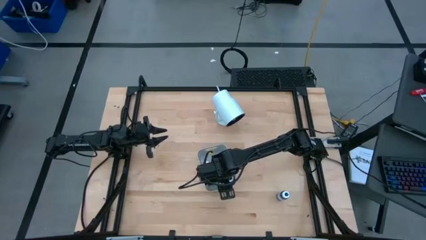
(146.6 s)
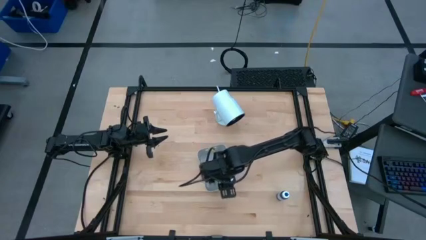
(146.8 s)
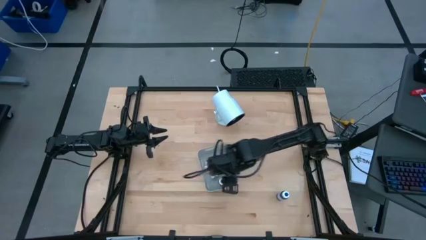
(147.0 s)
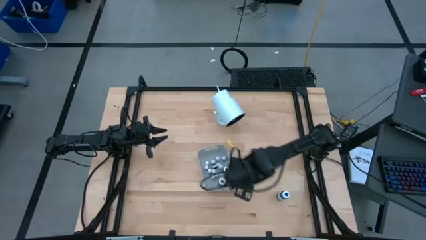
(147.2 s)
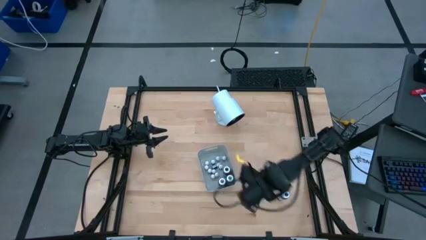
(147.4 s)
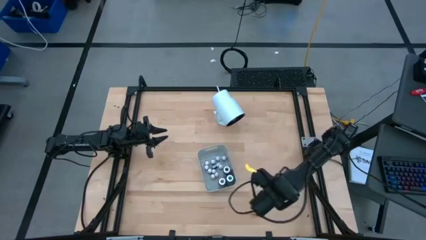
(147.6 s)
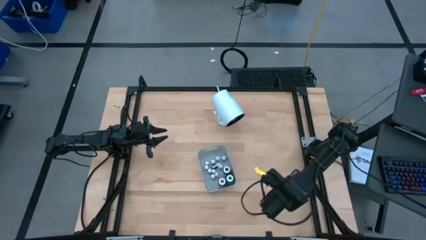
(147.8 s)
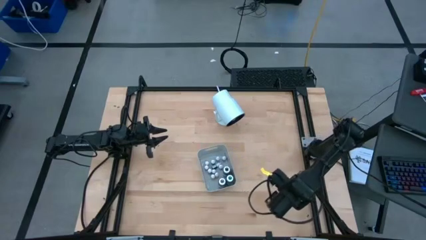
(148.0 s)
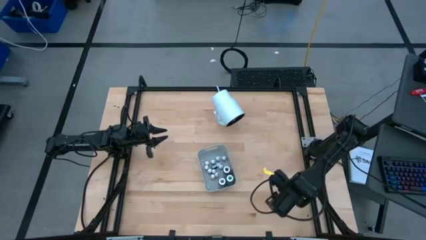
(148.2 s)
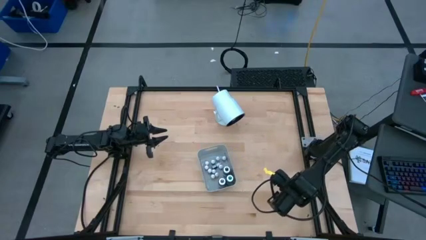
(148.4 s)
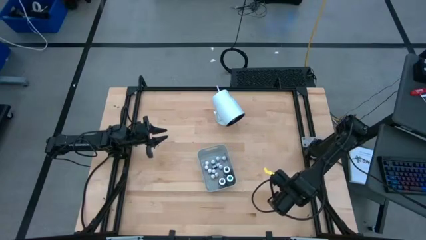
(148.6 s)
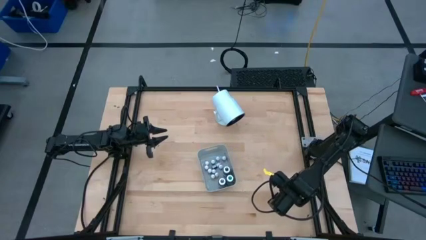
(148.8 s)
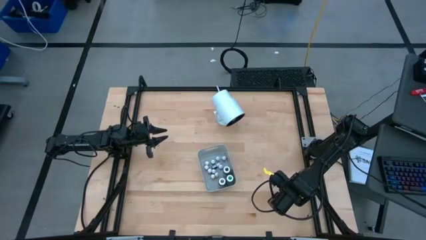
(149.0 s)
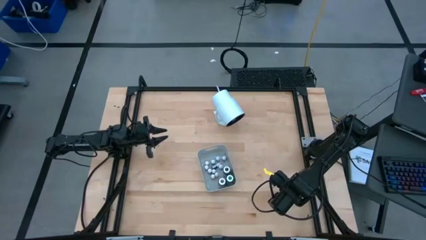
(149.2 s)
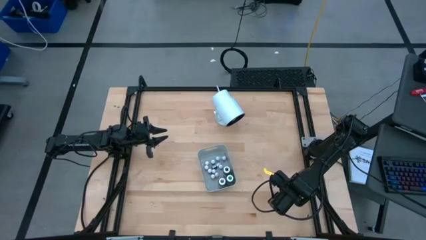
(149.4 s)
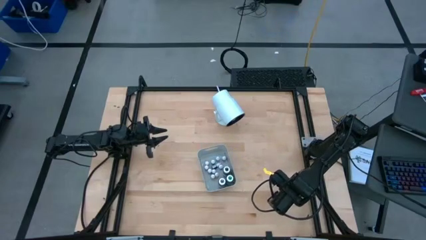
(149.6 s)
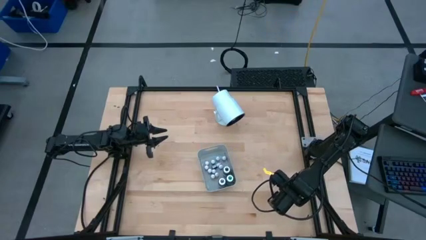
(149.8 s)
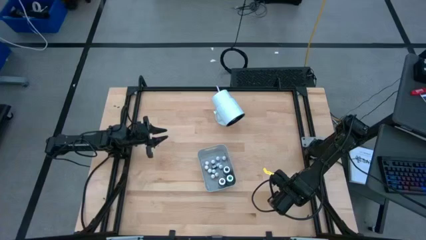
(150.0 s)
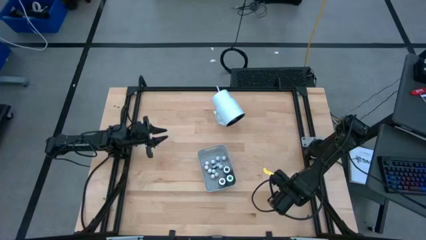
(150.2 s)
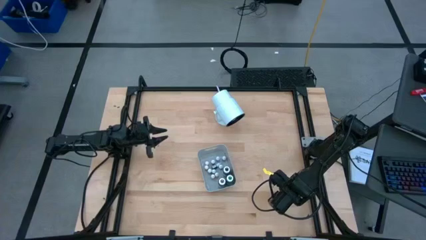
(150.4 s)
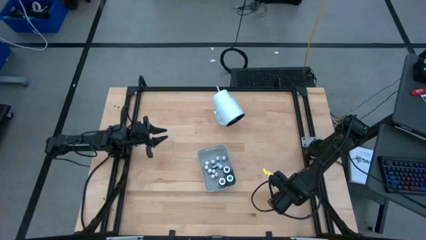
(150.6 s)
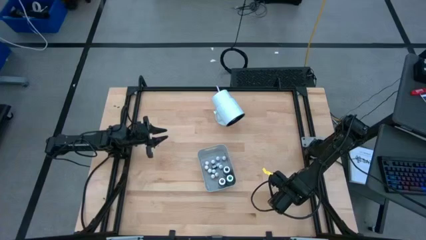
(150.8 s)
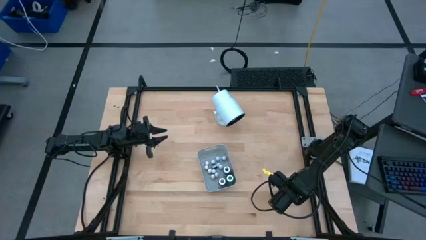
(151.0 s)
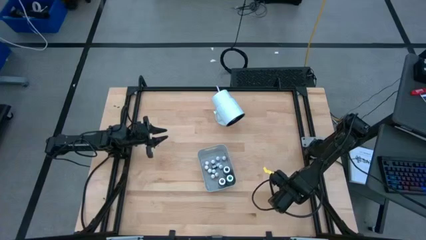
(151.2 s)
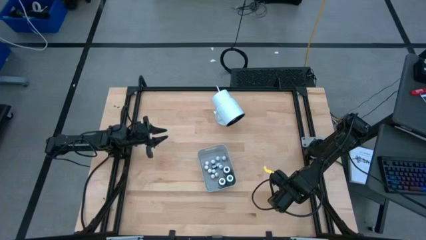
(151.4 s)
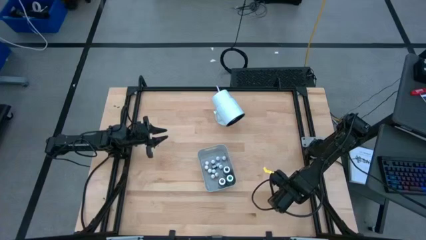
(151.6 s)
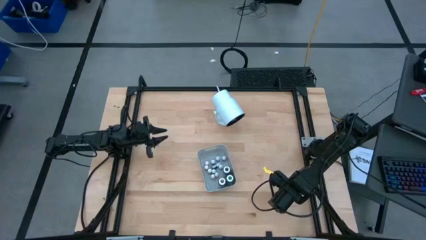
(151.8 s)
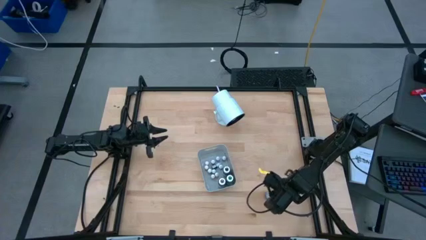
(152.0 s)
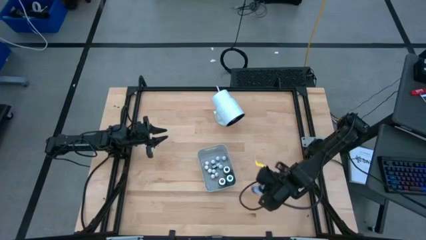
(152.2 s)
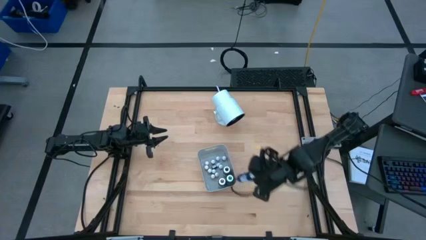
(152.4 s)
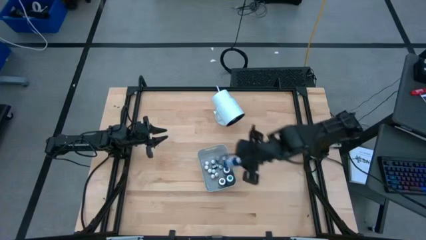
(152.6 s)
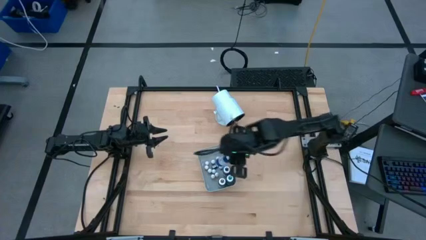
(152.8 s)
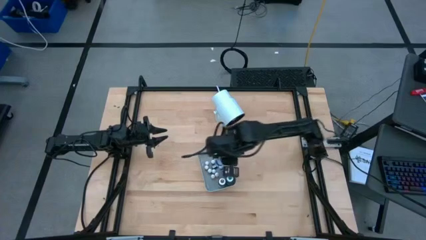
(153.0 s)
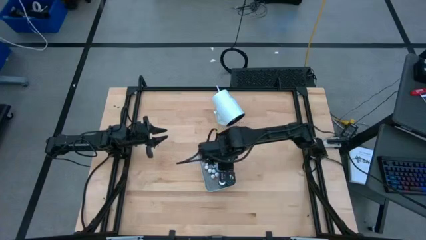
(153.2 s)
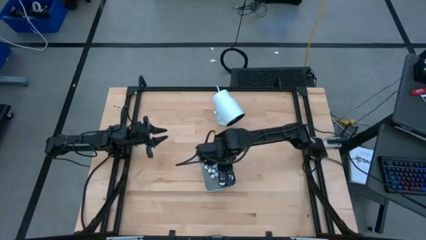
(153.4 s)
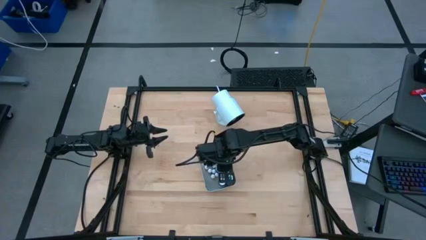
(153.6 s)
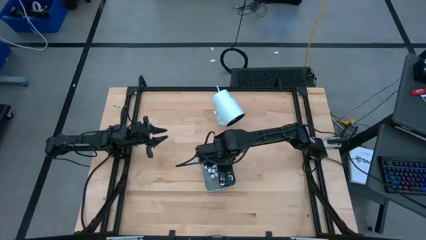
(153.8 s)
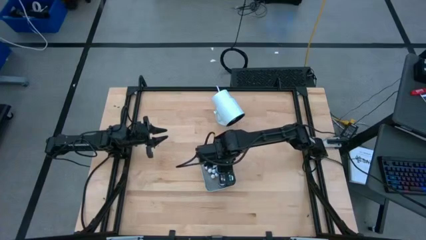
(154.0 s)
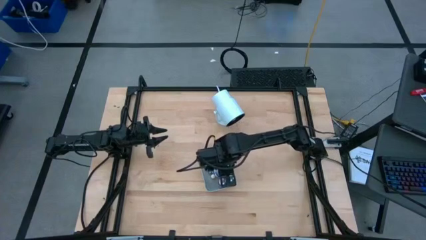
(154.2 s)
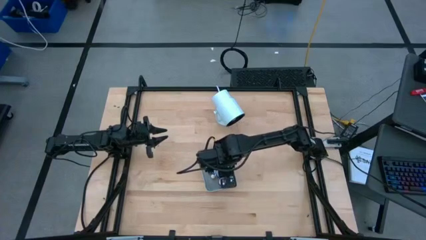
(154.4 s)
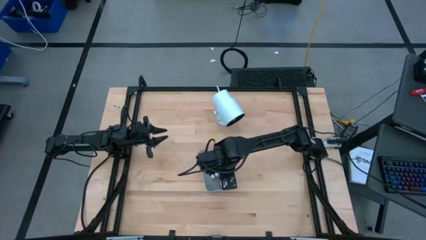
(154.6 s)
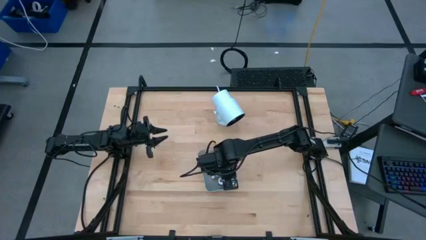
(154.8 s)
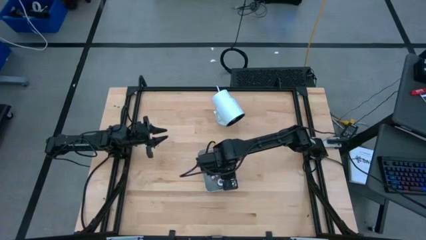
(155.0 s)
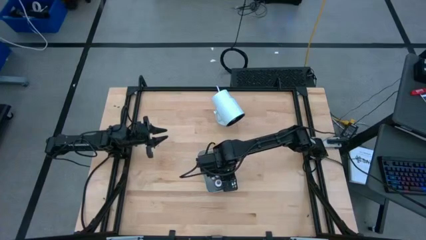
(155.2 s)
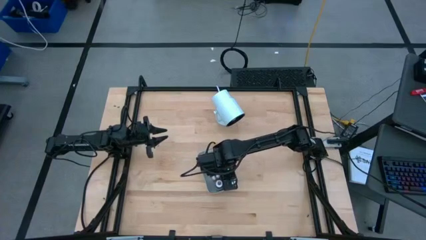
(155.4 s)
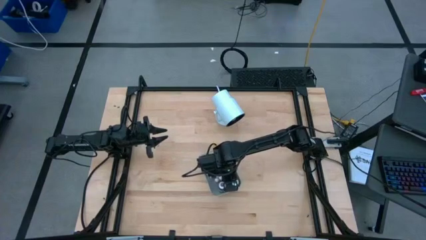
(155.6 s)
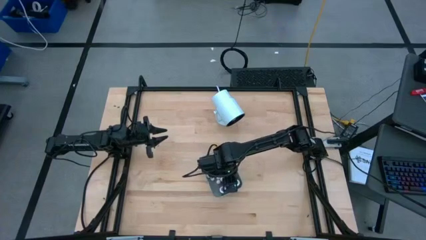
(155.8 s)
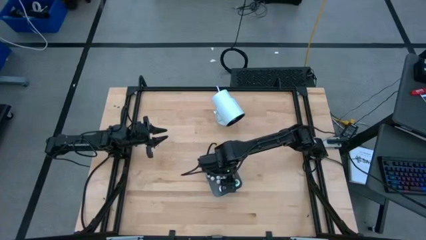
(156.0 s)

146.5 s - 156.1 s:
Task: Pick & Place food coloring
Put the big blue food coloring bottle into the gray bin

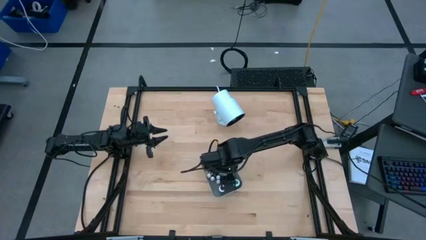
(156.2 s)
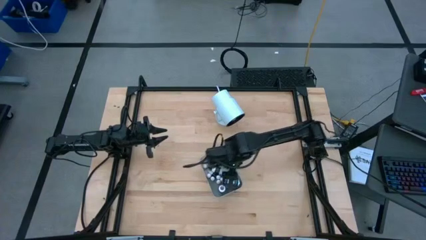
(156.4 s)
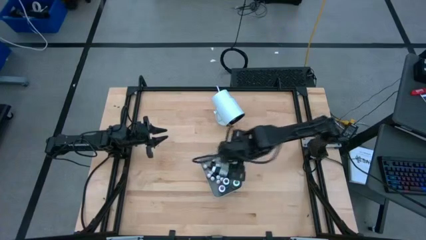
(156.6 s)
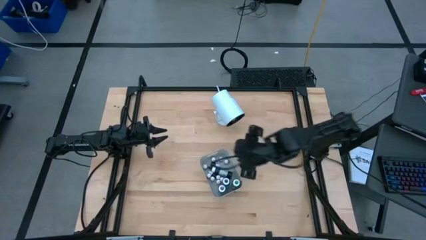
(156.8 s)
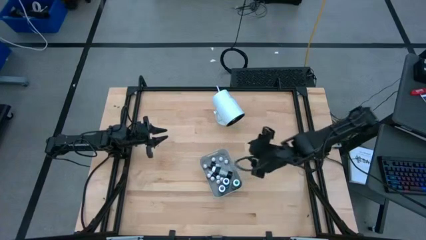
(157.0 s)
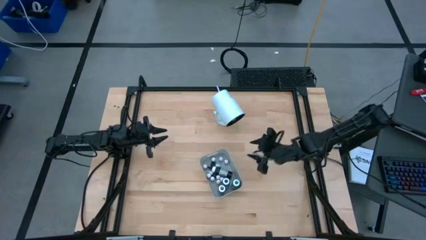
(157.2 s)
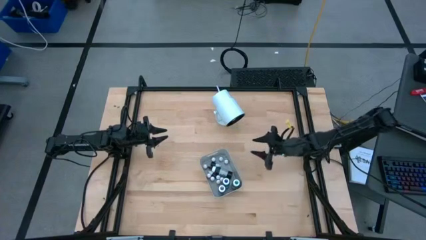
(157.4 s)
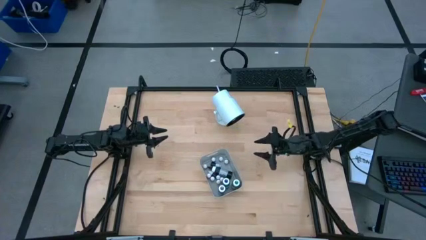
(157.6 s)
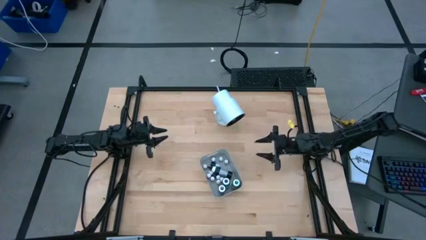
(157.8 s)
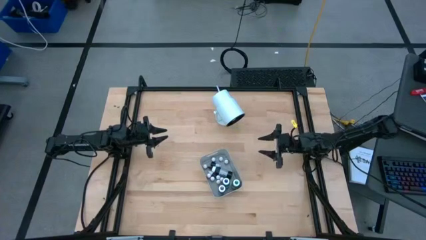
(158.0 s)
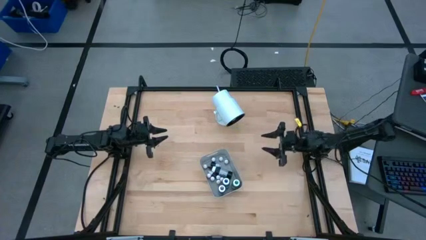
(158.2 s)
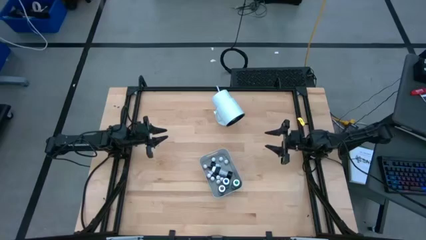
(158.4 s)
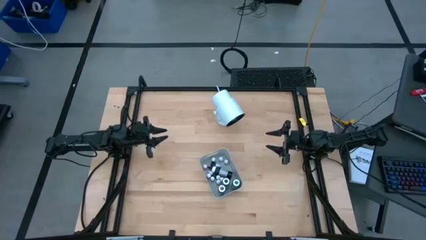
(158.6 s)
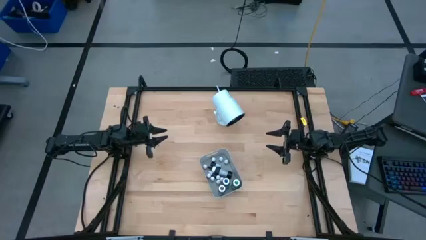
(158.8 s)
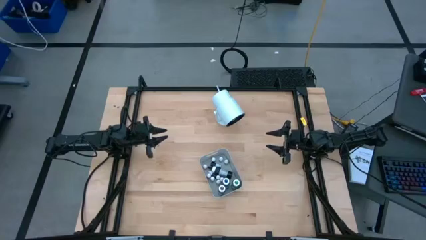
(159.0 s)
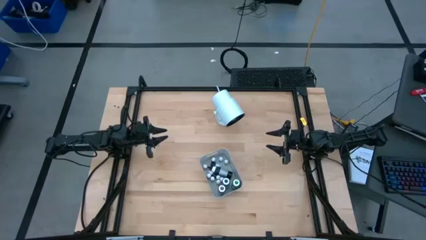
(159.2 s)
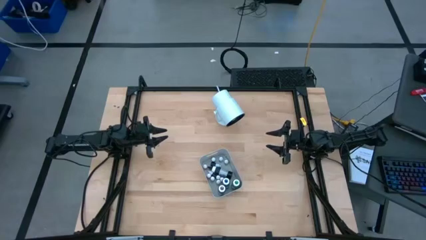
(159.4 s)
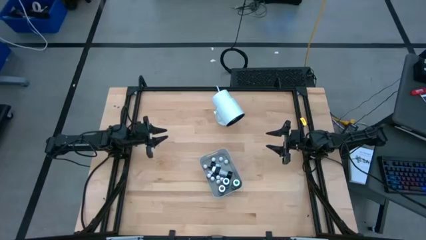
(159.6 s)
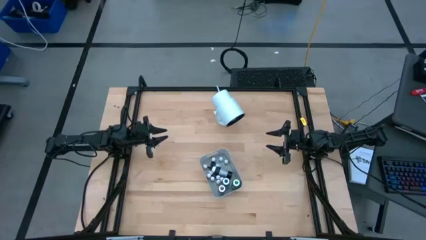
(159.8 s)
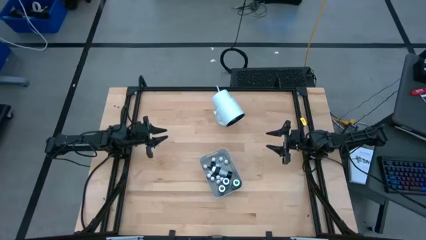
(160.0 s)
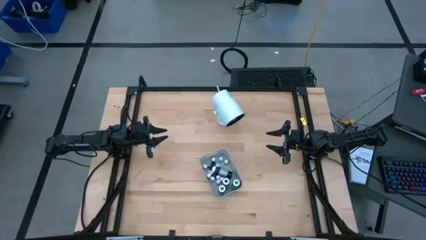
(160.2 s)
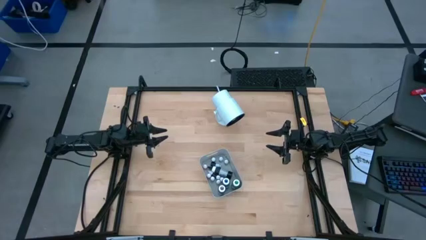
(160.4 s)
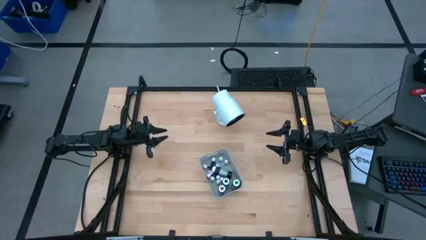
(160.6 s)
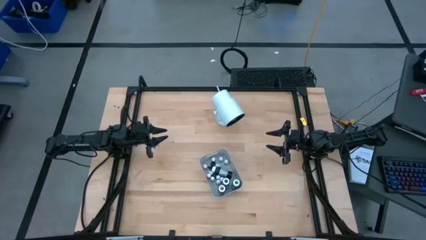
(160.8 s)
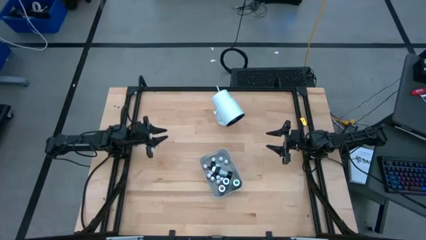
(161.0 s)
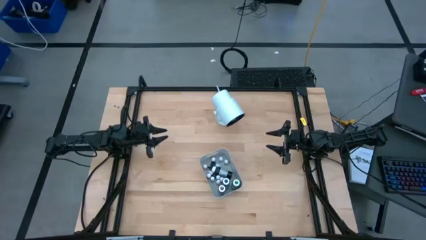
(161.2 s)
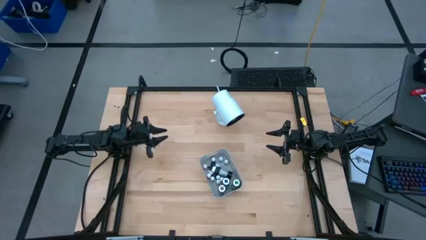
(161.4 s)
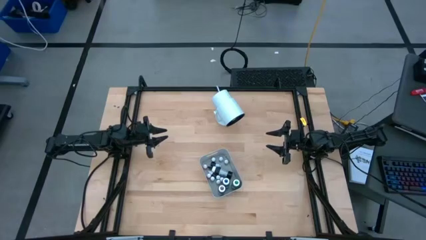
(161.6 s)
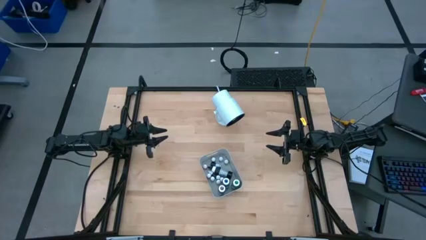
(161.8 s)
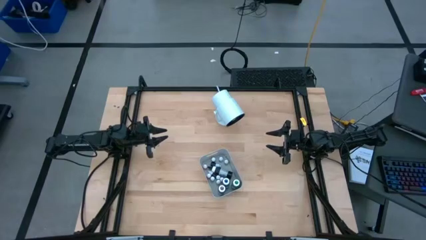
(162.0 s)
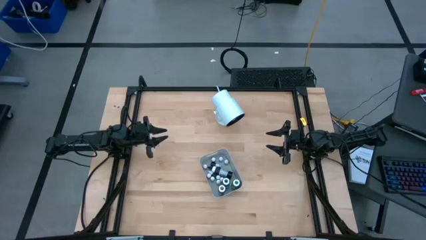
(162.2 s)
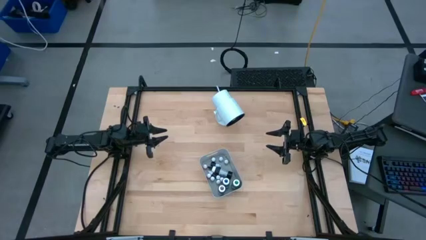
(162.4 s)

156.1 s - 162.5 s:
Return to Home Position
